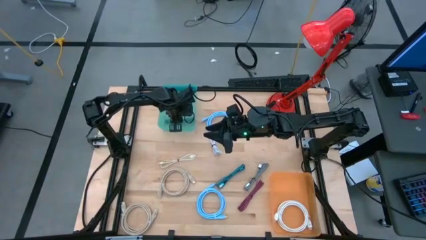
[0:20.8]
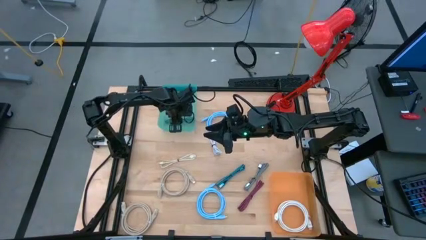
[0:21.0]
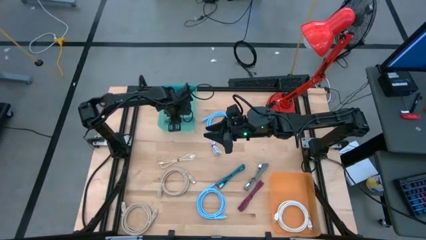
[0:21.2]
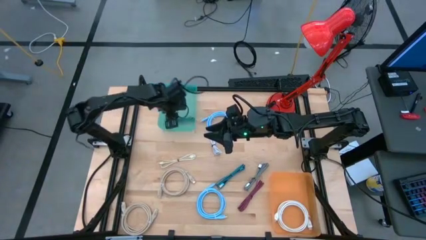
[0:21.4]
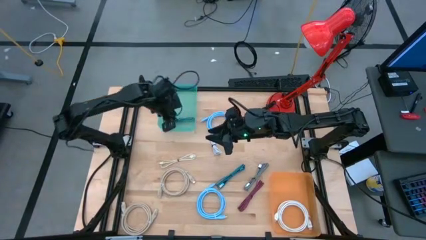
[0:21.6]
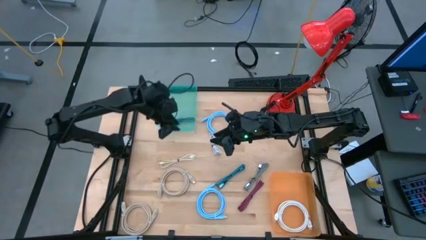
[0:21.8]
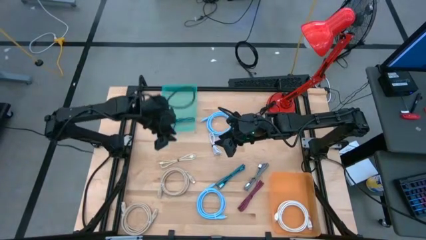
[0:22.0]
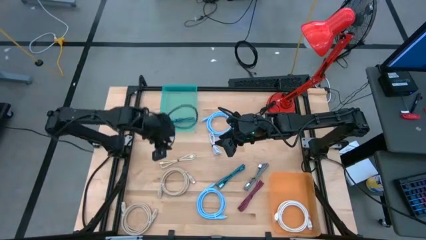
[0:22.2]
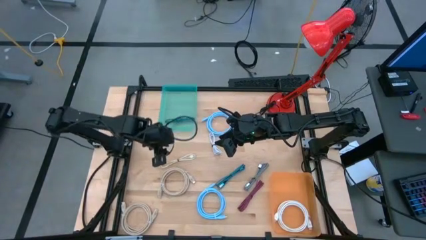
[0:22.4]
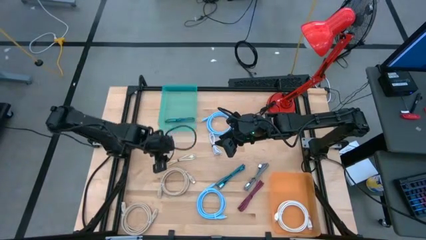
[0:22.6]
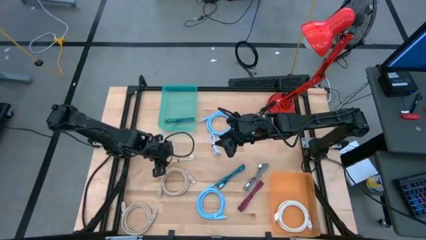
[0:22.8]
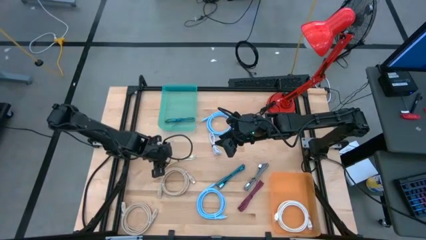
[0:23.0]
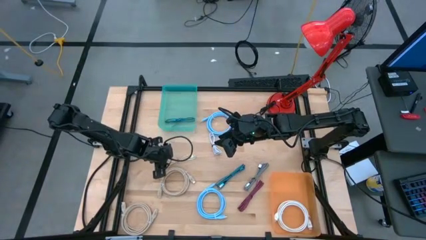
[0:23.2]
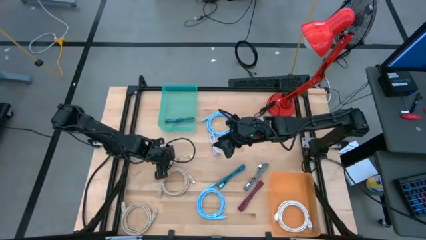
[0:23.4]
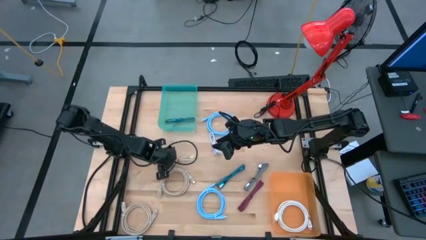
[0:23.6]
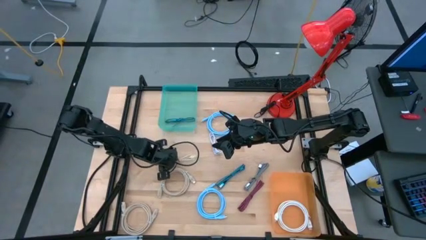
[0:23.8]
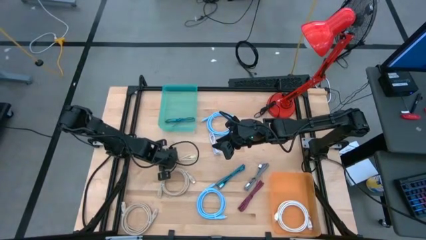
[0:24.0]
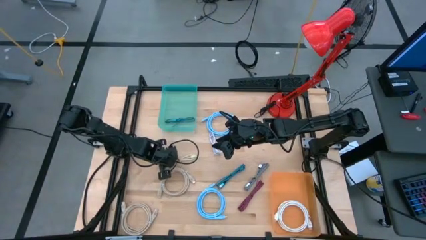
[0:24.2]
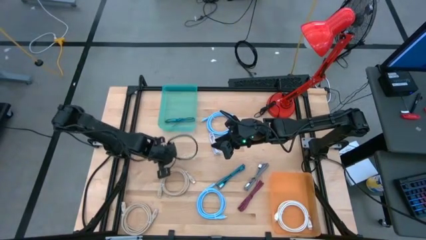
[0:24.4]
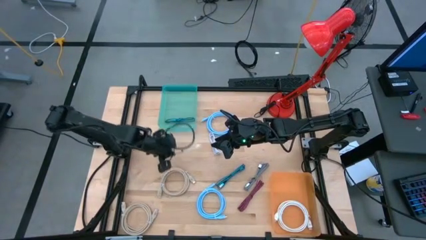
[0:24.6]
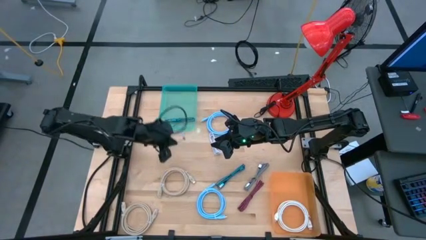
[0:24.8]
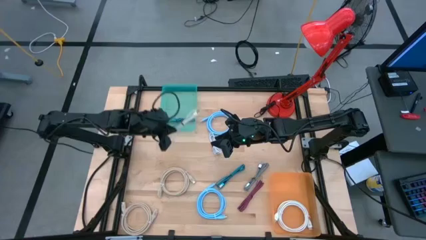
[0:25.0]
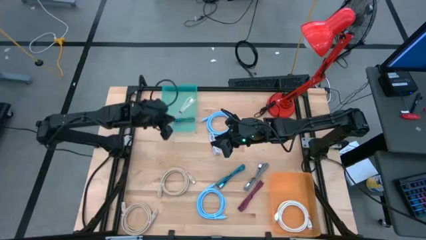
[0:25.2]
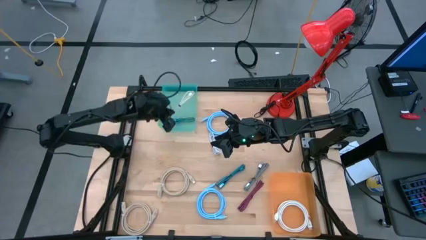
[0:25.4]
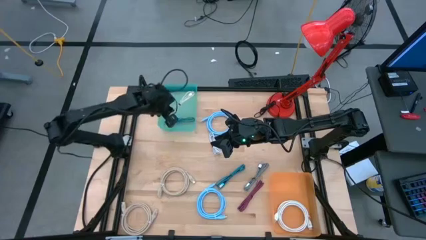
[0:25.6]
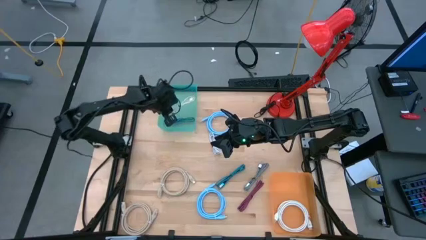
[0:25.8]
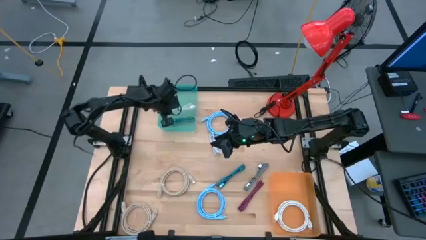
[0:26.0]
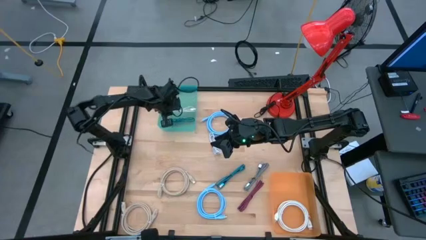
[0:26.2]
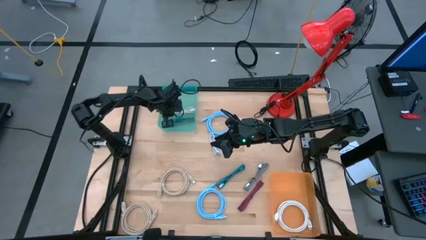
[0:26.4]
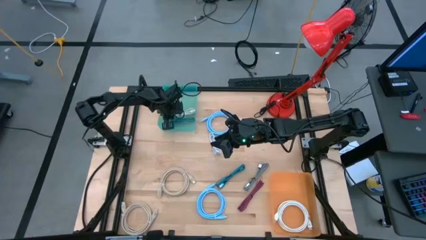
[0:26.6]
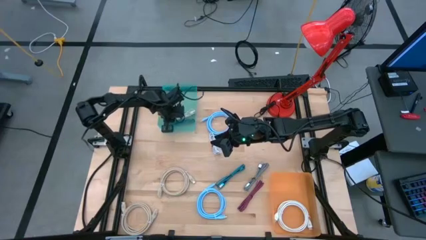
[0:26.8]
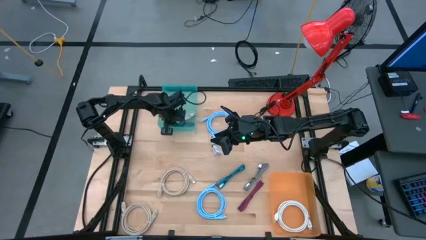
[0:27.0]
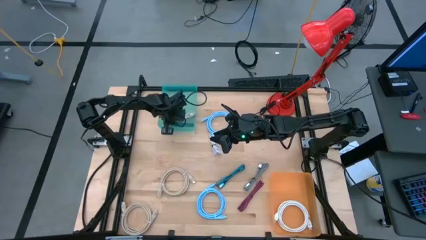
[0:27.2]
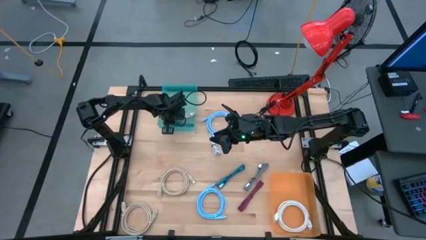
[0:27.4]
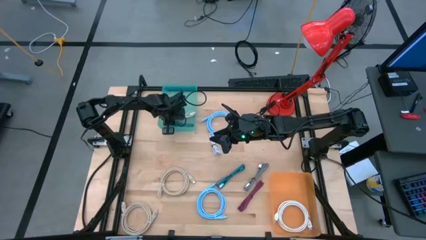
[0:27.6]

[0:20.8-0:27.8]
Task: Pick & Place USB Port
Put the light brown USB cable into the blue bin

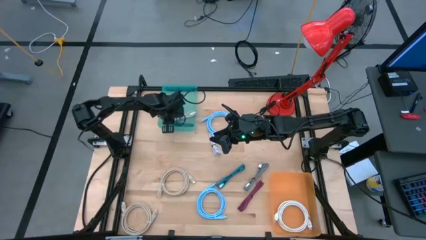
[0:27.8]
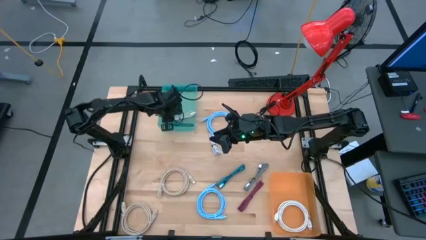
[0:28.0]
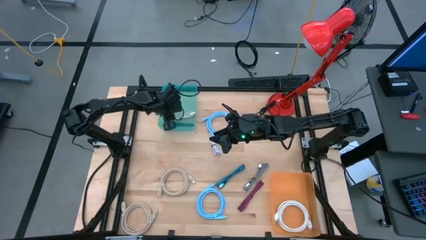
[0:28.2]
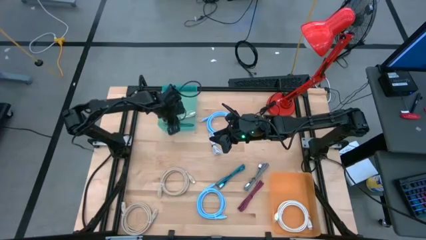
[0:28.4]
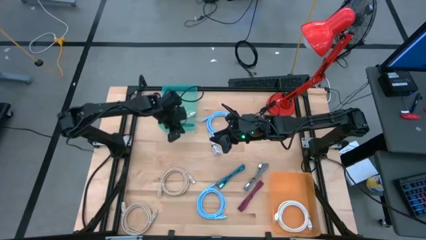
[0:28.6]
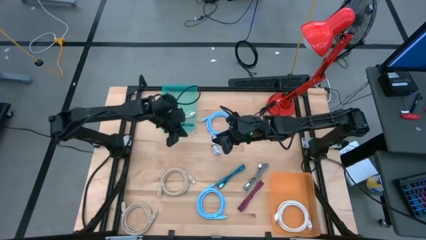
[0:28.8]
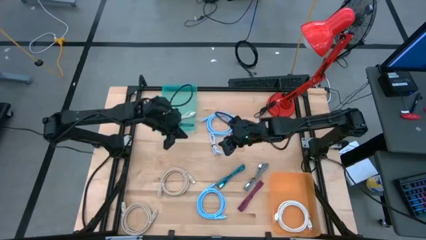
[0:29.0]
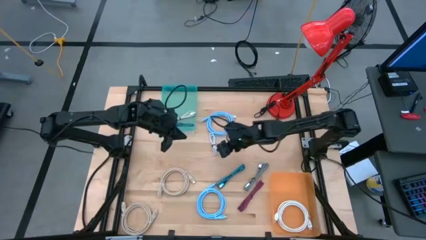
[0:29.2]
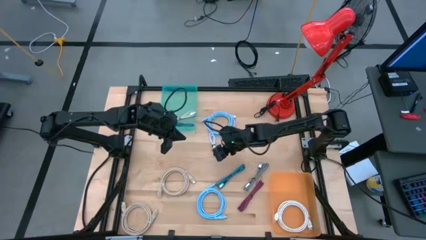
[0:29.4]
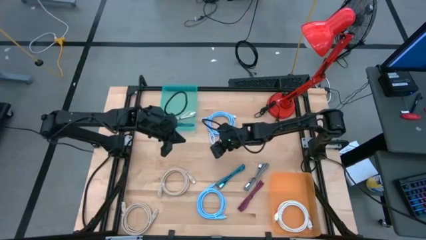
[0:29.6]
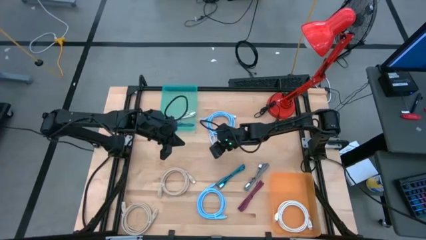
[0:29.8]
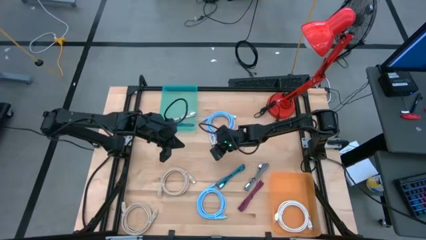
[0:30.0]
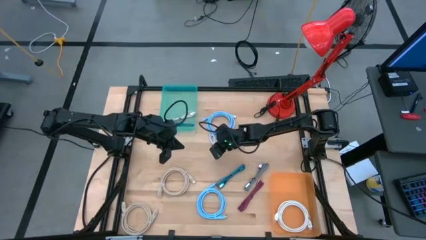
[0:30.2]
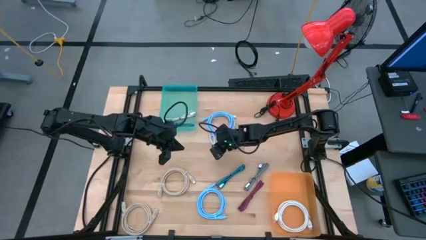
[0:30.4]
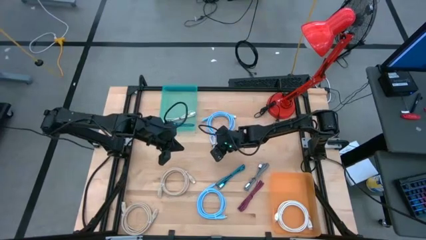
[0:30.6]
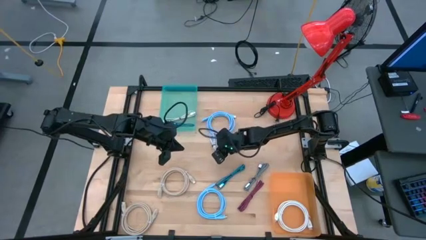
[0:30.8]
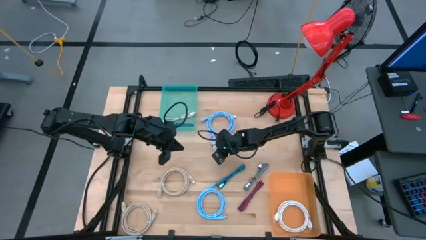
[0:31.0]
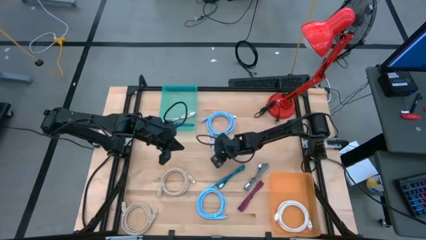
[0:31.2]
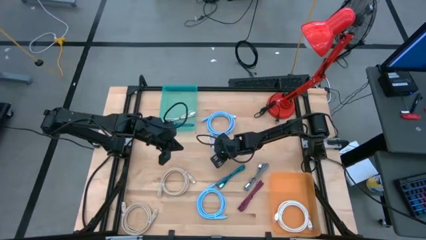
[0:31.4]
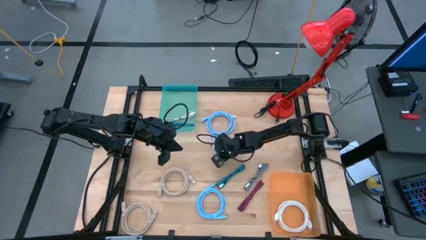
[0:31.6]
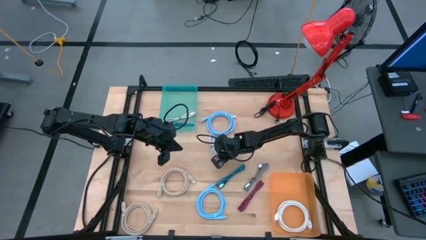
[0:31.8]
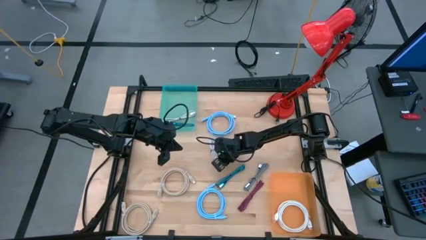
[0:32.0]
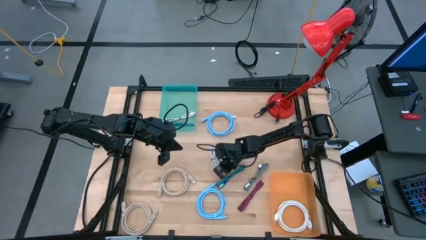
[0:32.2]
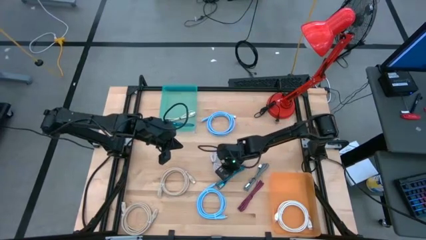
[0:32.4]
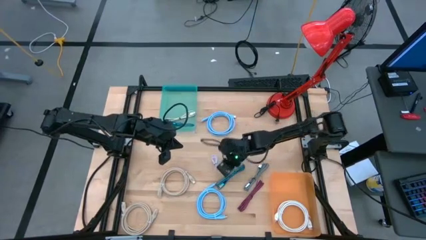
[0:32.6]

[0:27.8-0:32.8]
Put the white USB cable into the blue bin

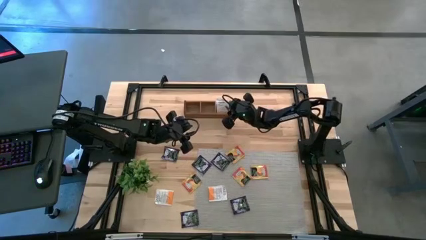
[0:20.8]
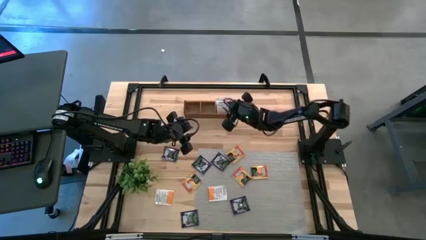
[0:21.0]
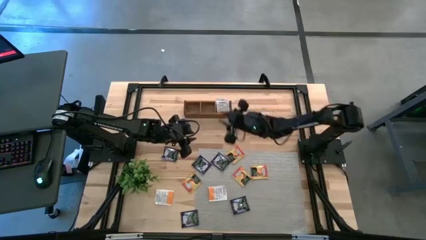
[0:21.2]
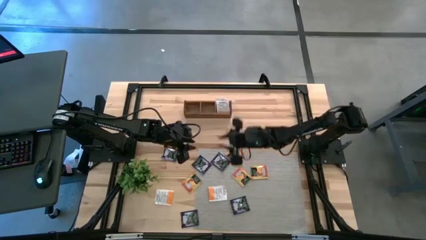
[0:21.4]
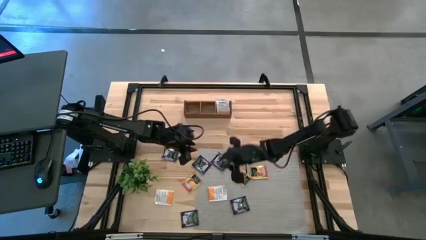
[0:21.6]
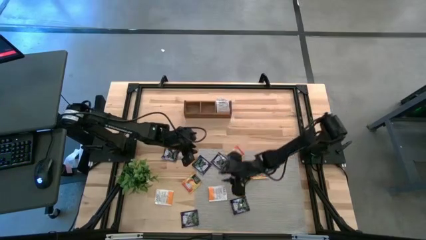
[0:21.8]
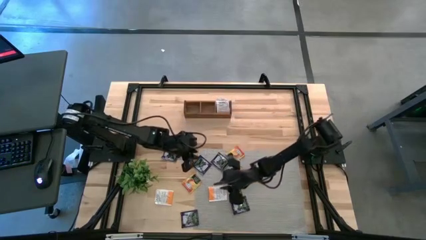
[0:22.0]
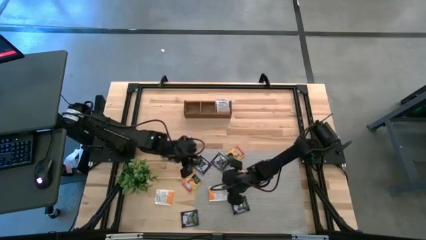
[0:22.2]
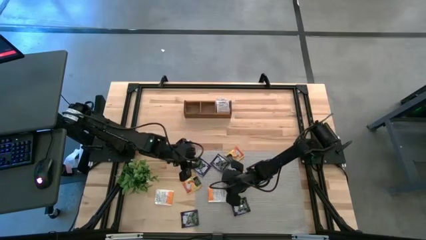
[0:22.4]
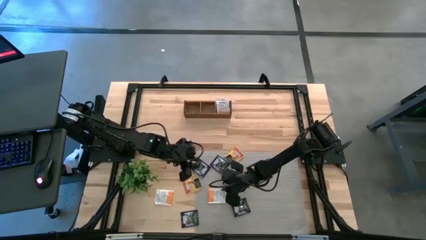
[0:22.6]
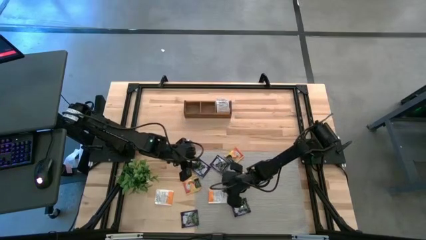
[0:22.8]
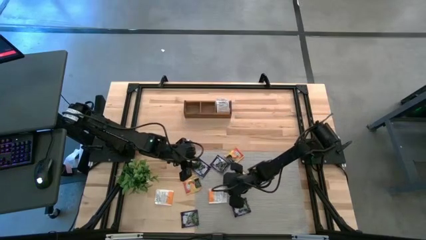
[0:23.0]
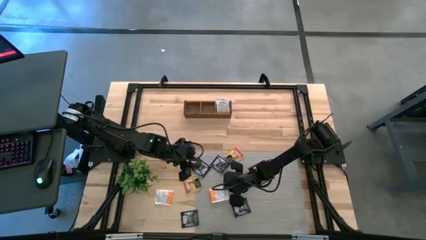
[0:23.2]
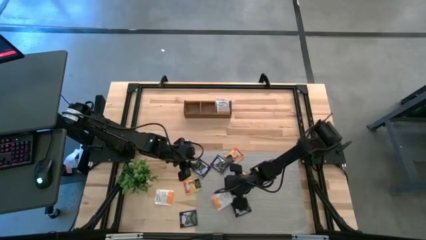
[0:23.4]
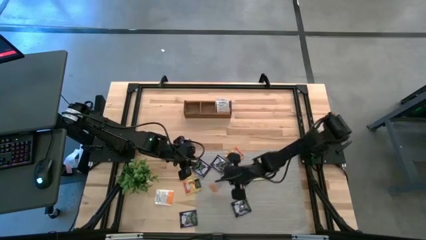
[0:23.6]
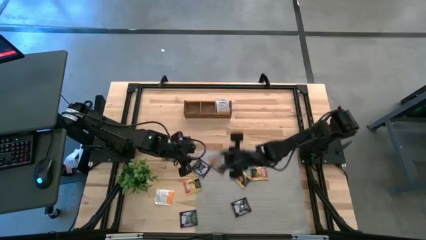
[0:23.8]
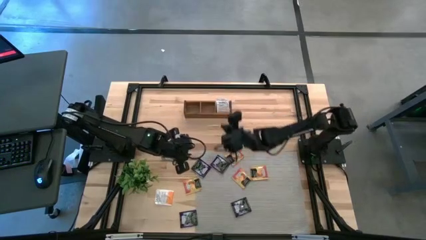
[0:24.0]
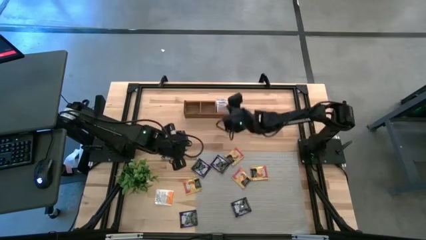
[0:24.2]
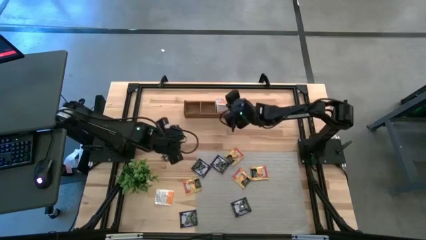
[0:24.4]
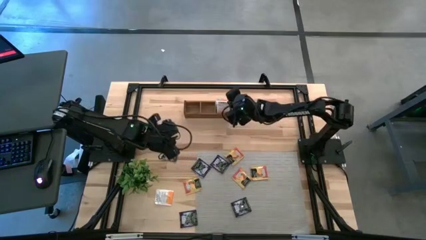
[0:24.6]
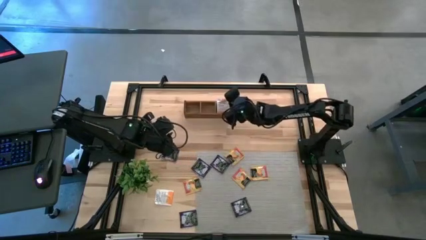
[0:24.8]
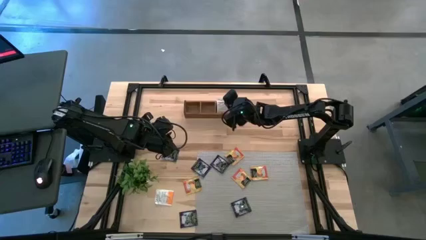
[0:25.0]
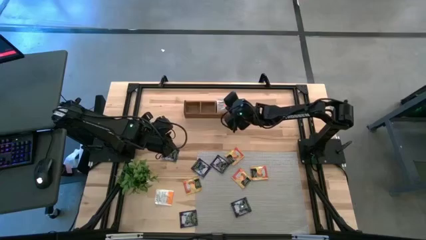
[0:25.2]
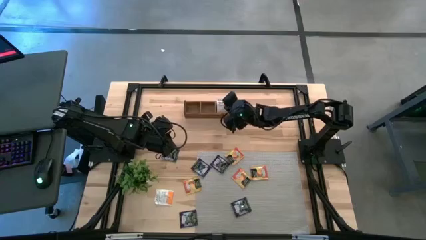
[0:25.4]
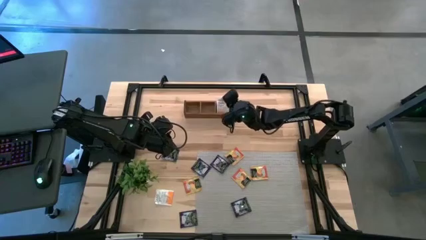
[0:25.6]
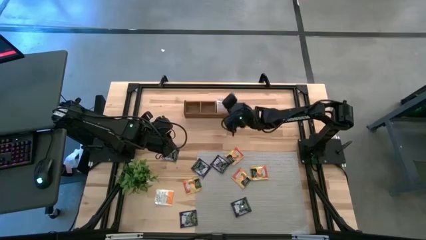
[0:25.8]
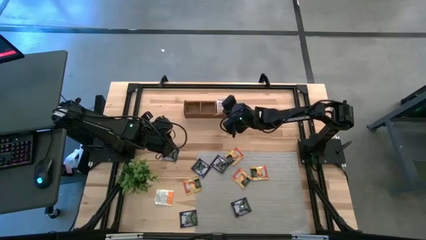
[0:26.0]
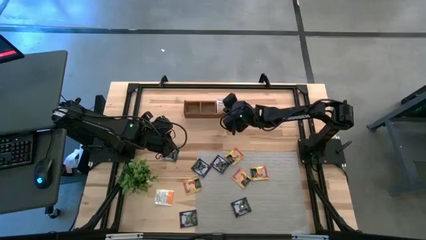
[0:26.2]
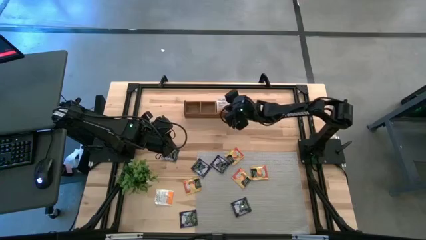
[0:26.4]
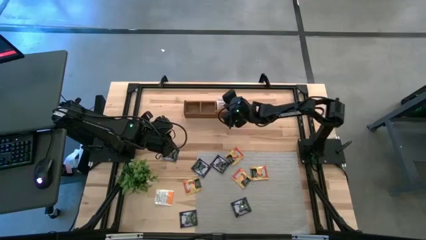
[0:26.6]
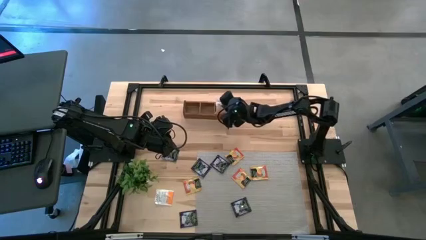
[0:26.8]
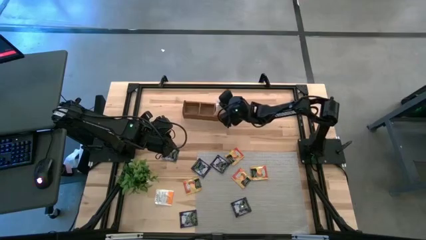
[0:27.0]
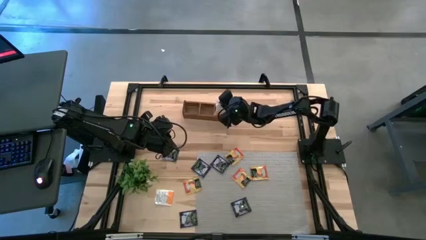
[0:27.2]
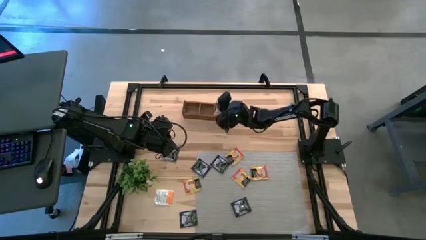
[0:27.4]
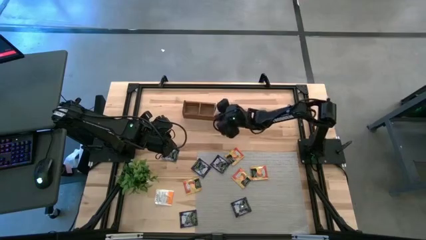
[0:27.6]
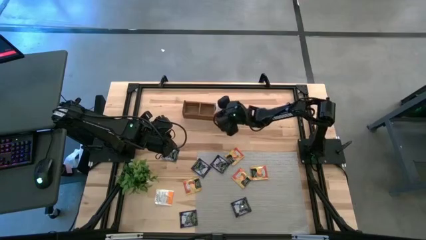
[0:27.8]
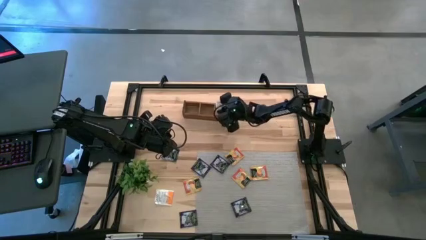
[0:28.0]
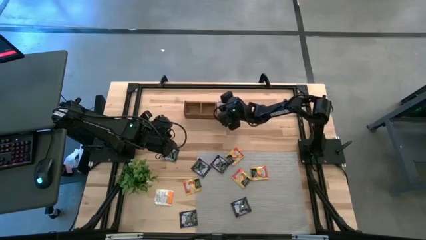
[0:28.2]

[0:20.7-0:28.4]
Task: Pick & Place Tea
Put the white tea bag into the right section of the wooden organizer
